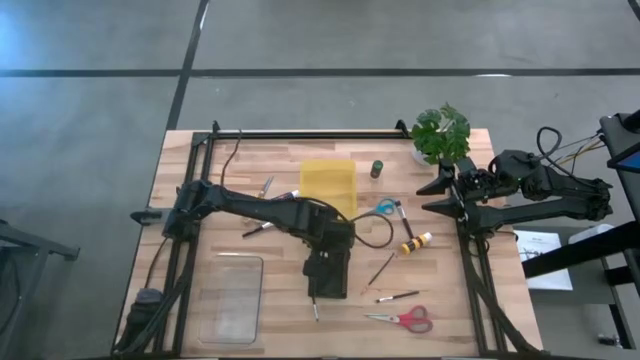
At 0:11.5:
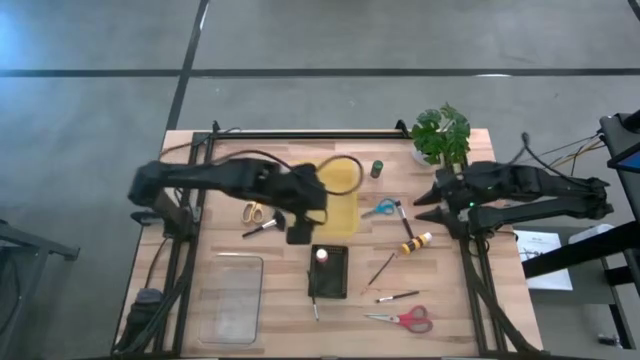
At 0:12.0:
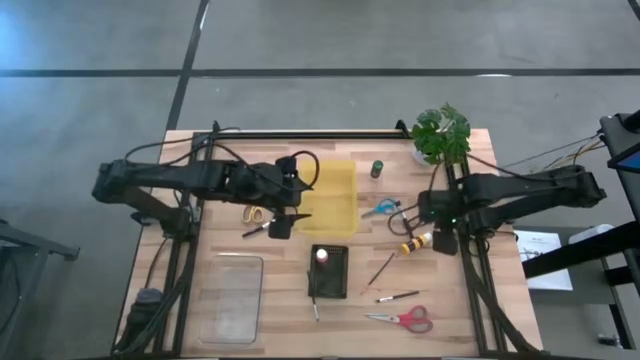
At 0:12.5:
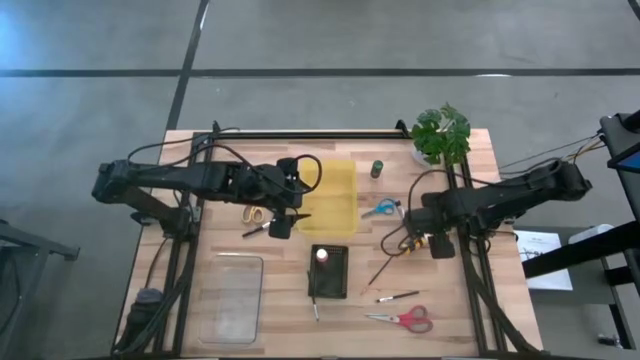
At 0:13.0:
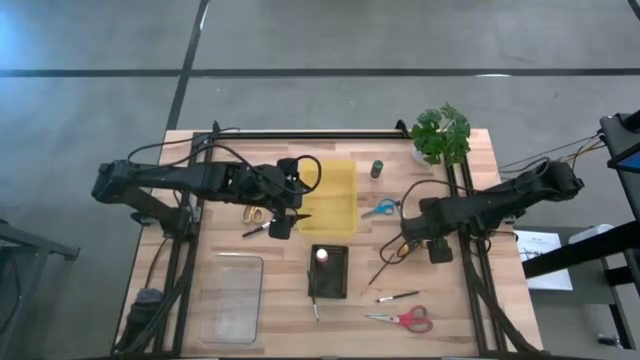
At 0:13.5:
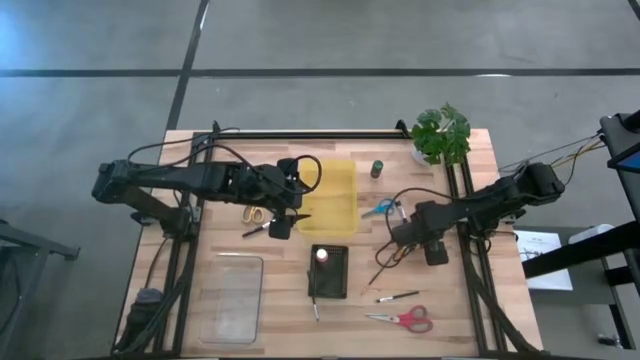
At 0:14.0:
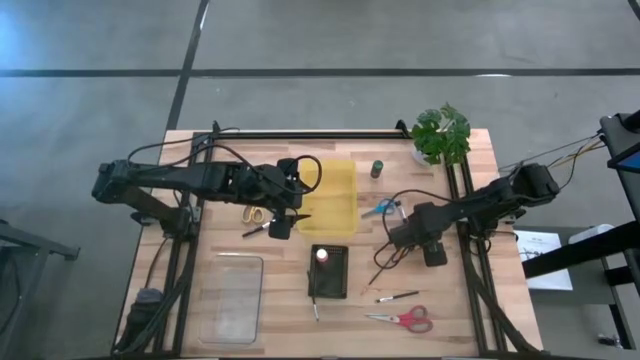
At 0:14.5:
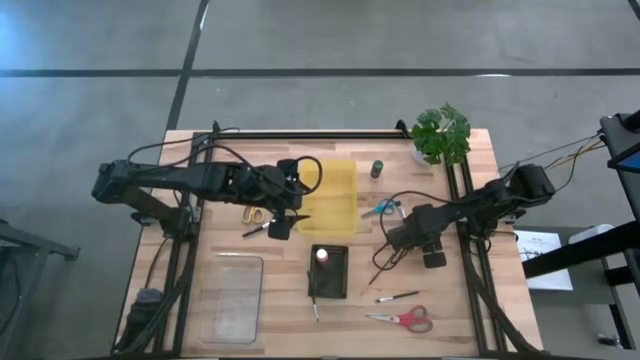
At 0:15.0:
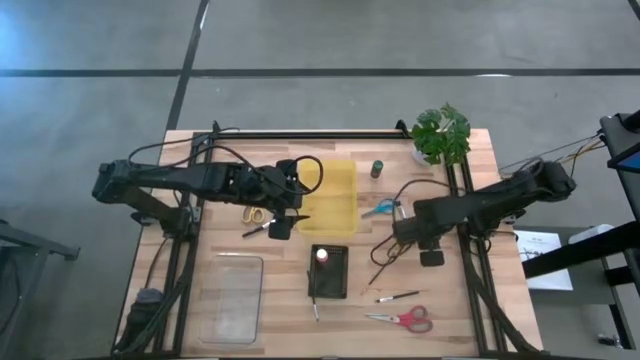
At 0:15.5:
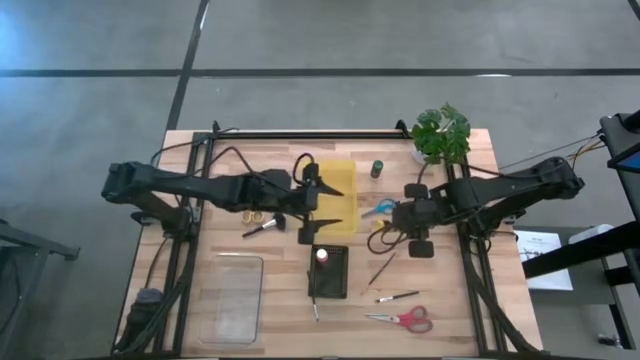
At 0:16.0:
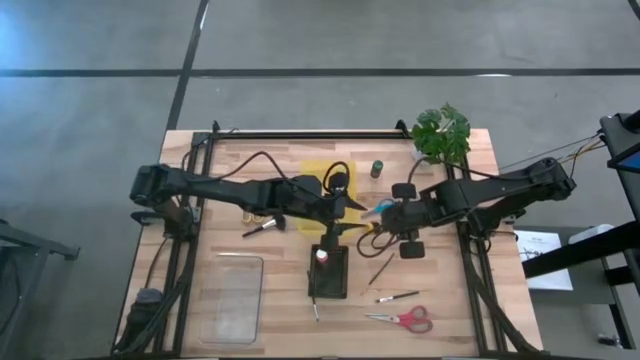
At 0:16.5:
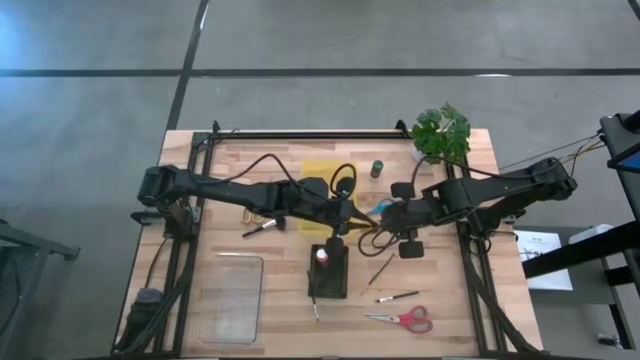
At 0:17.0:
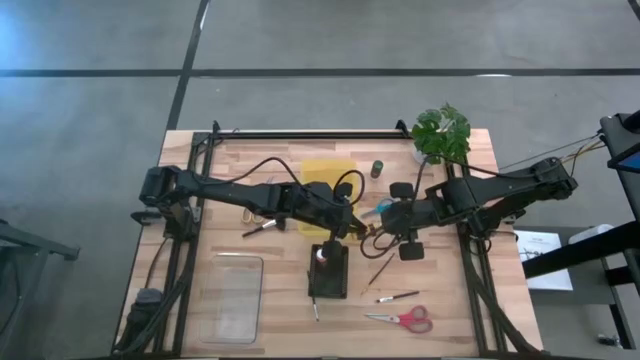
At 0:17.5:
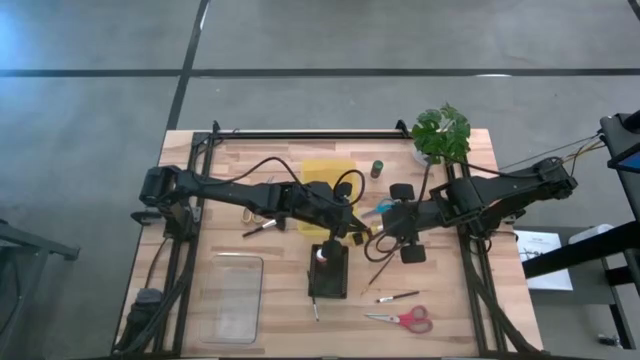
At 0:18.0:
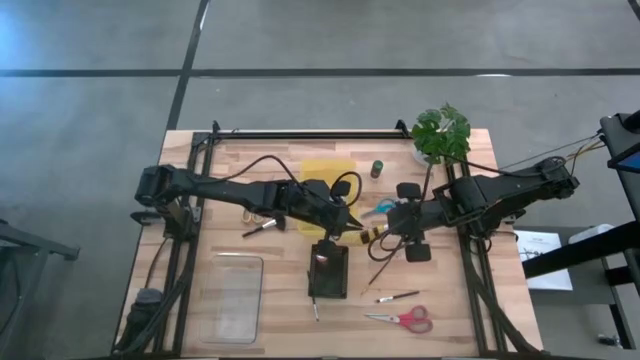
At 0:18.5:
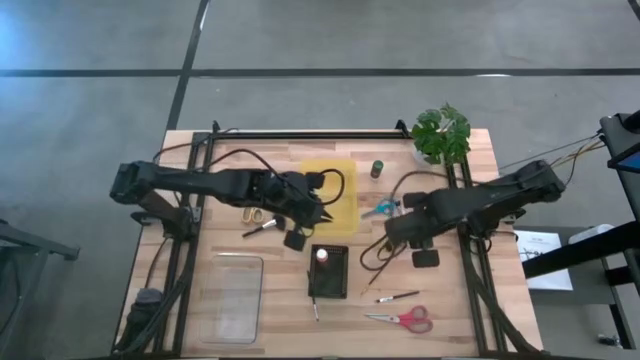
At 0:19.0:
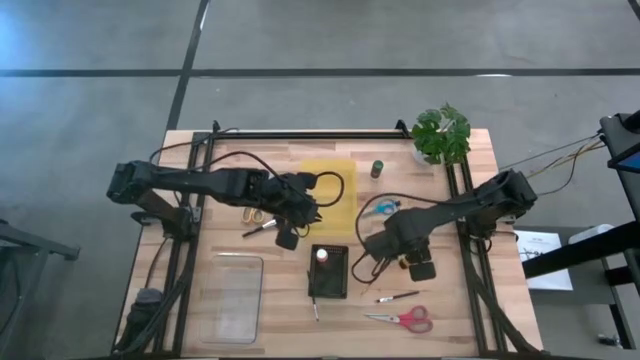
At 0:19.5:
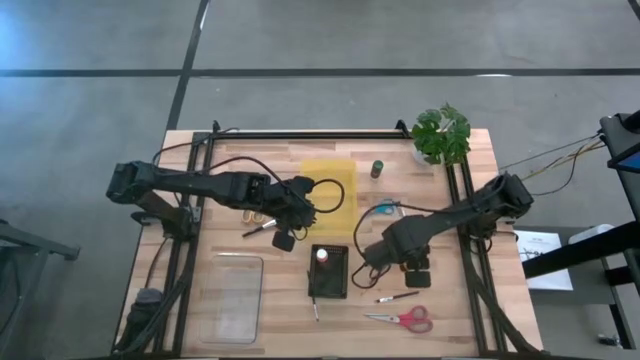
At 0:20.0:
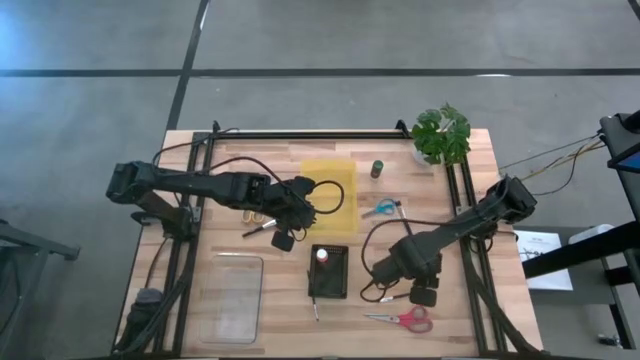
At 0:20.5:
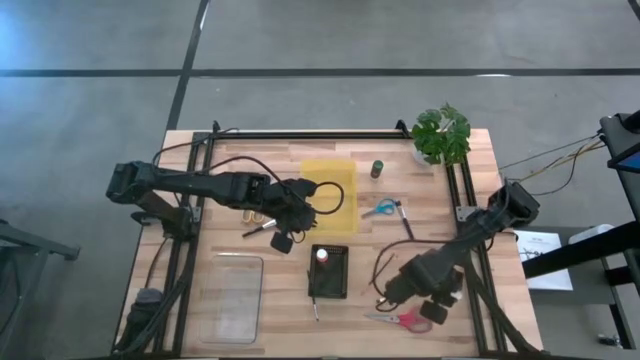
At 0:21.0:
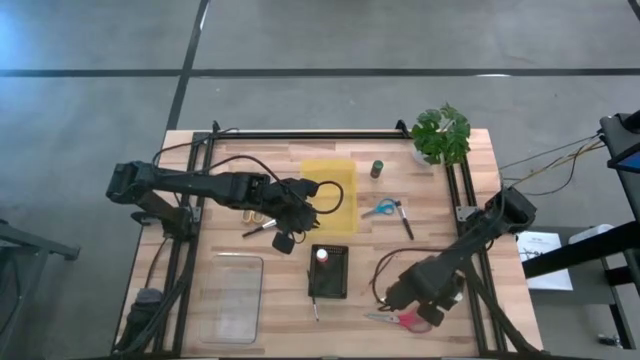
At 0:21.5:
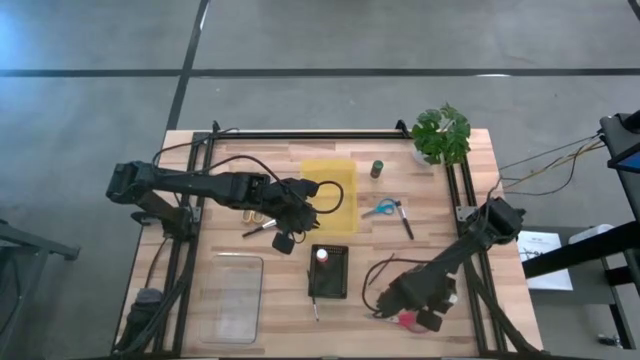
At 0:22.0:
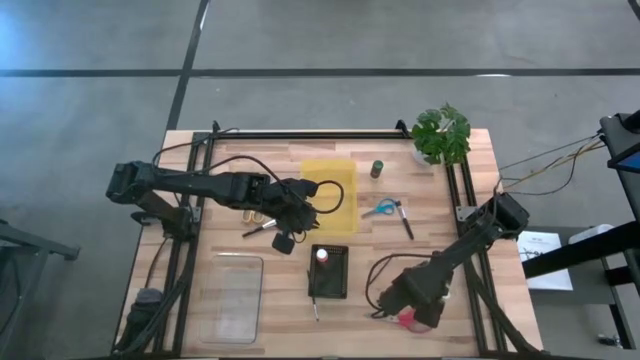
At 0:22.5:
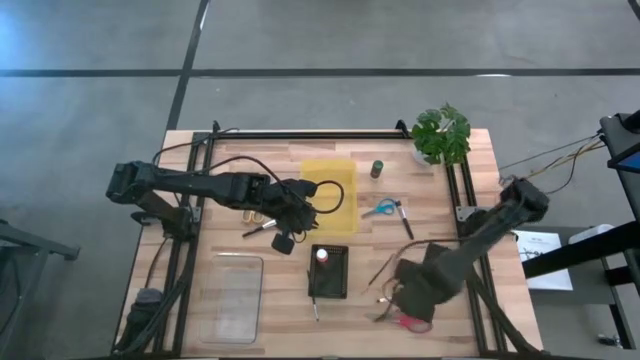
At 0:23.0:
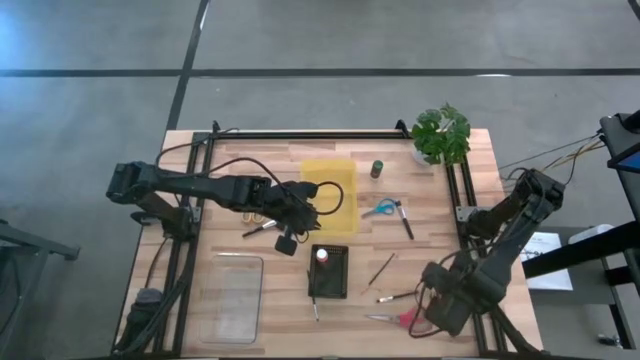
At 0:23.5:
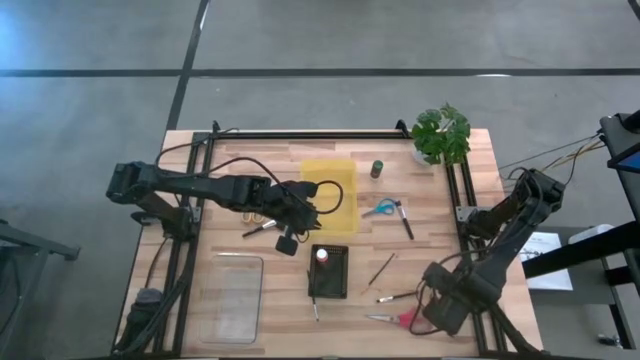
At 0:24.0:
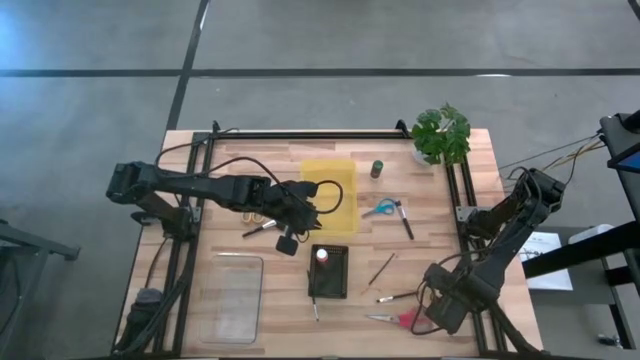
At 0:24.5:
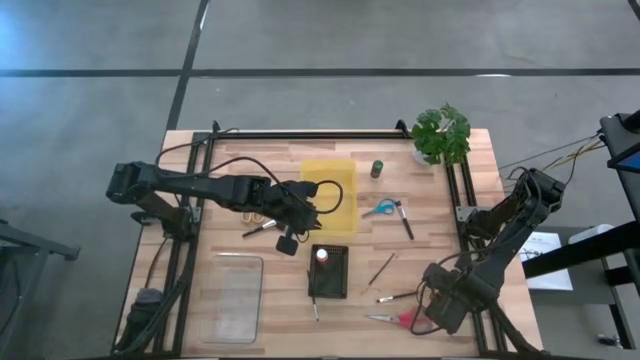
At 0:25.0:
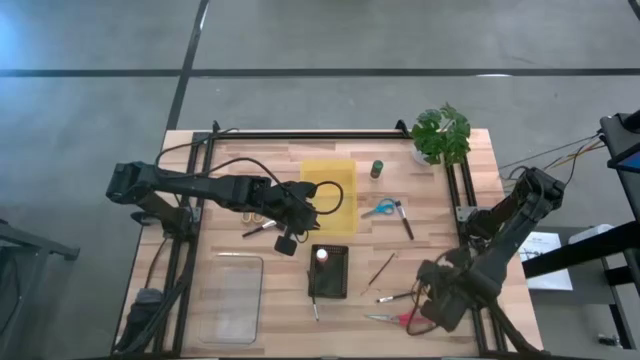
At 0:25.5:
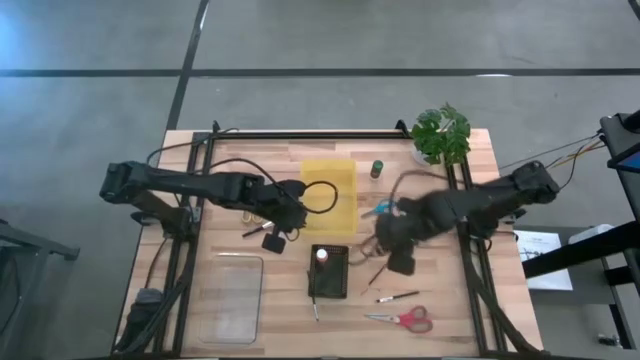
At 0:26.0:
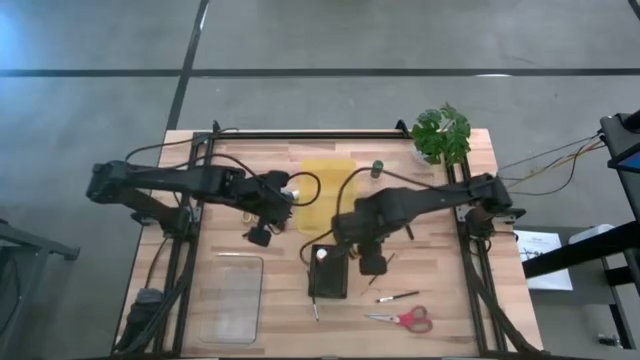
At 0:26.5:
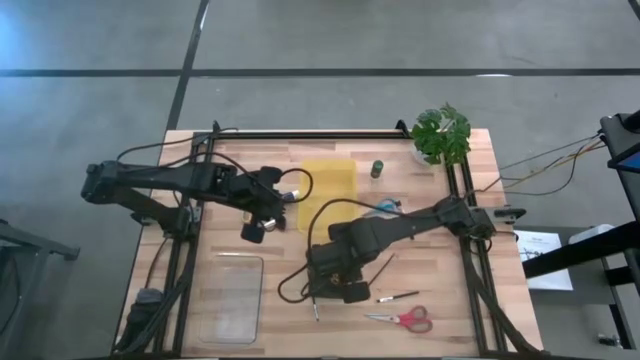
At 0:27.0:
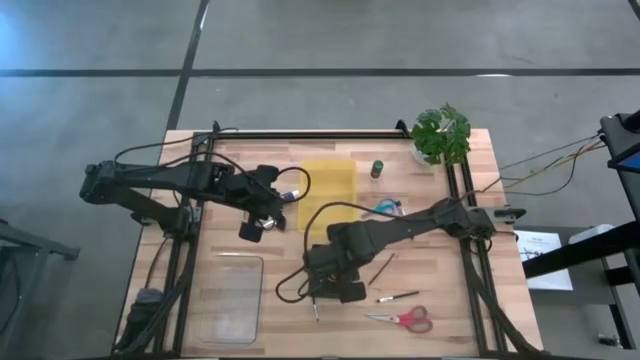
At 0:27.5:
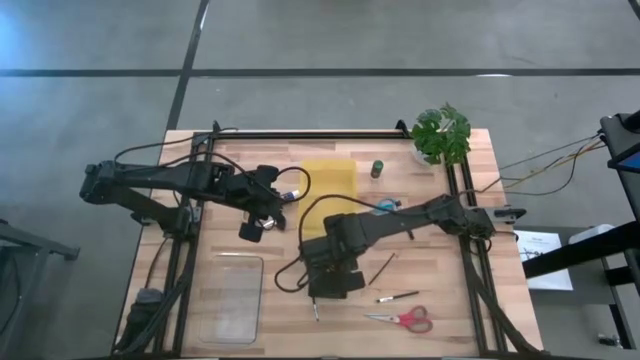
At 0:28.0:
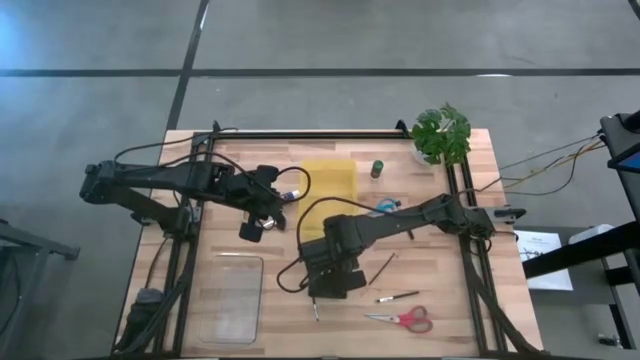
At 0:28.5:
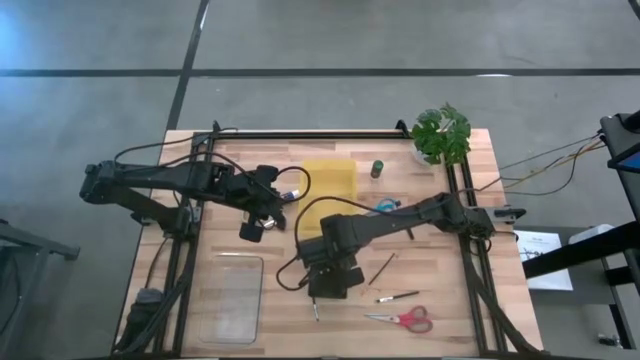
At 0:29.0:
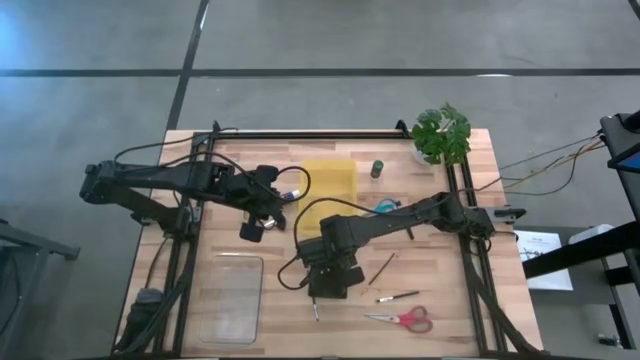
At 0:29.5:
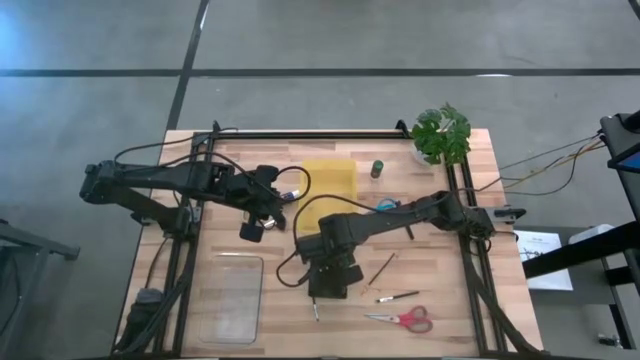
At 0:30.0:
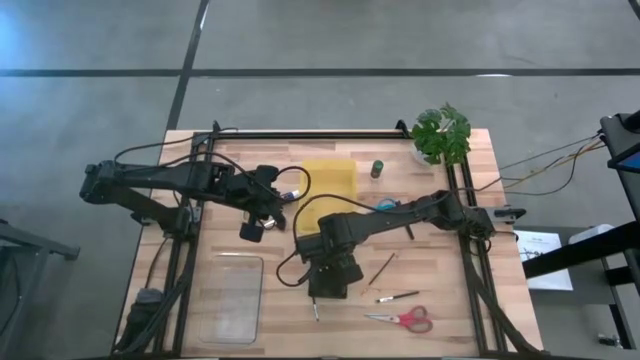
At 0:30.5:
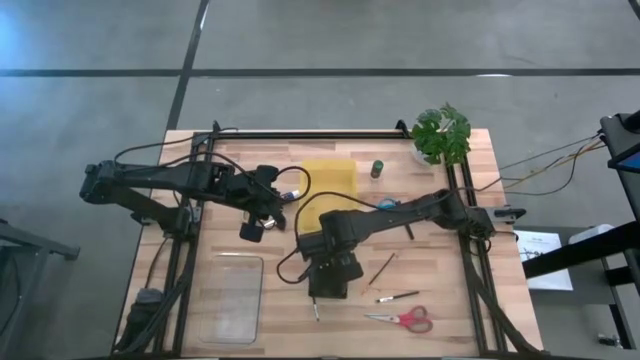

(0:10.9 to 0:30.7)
Task: Pick & Place Paint Supplies
Put the yellow paint bottle into the black bin
